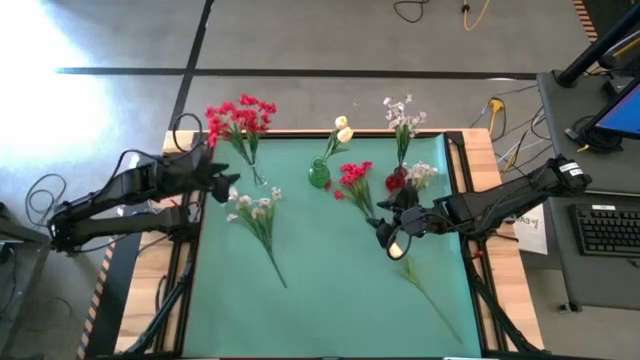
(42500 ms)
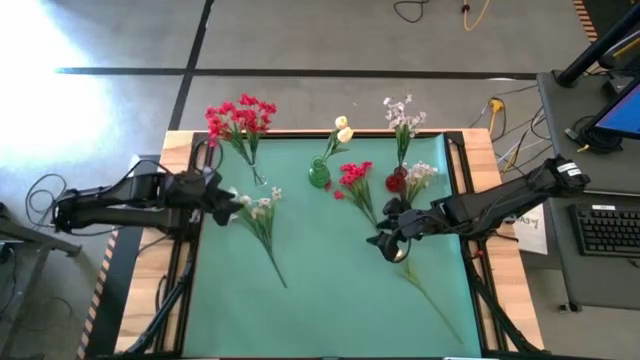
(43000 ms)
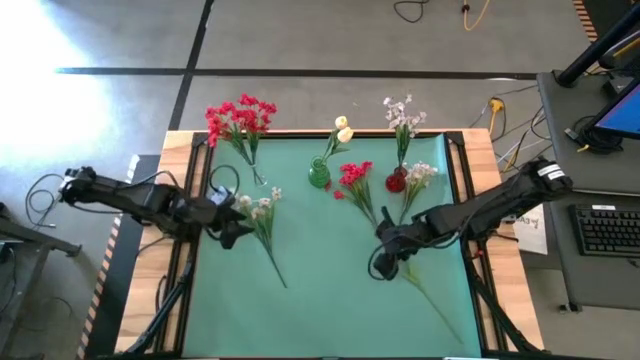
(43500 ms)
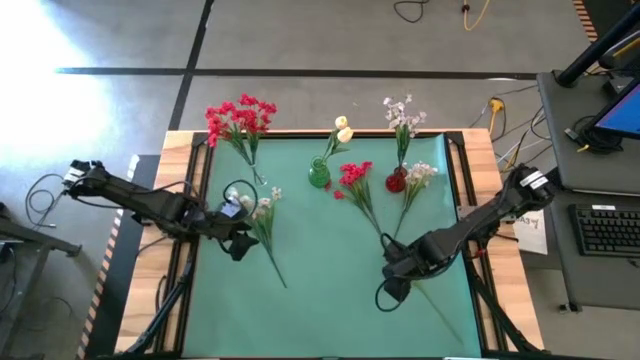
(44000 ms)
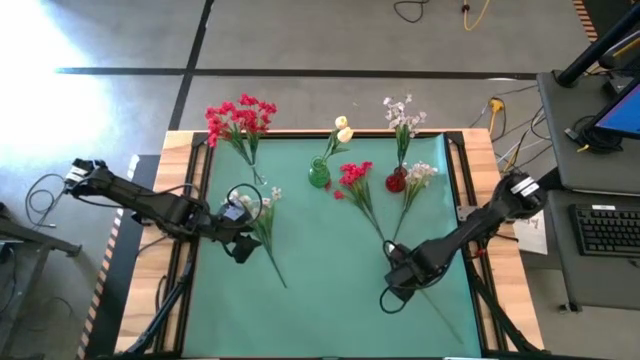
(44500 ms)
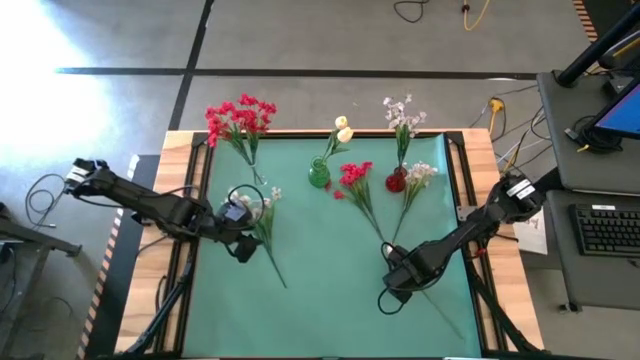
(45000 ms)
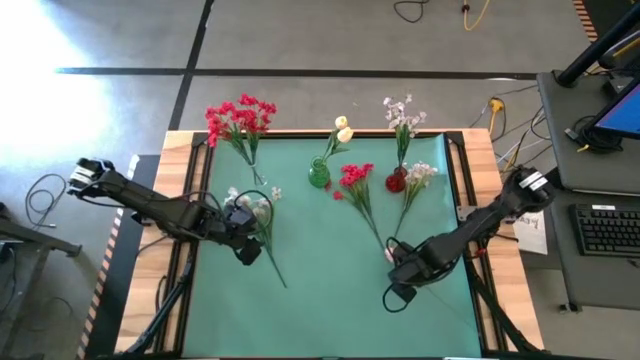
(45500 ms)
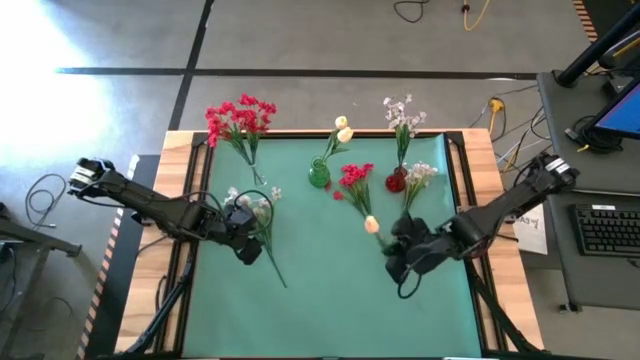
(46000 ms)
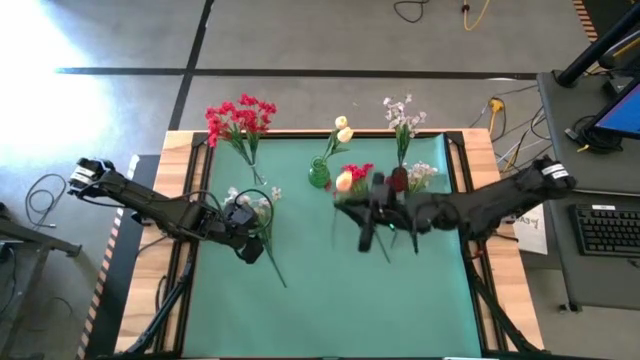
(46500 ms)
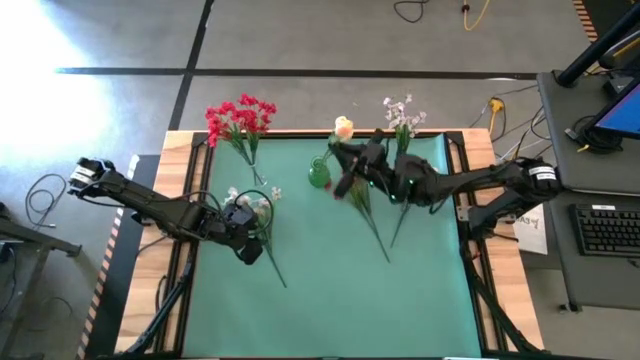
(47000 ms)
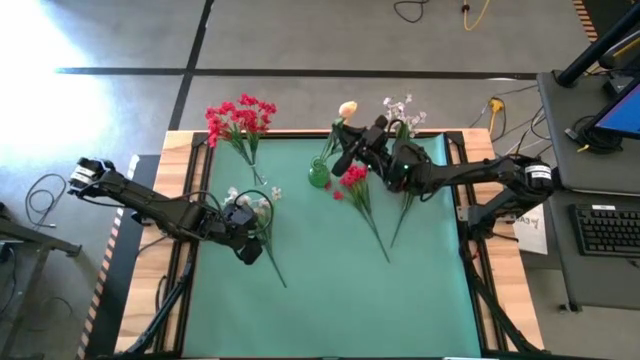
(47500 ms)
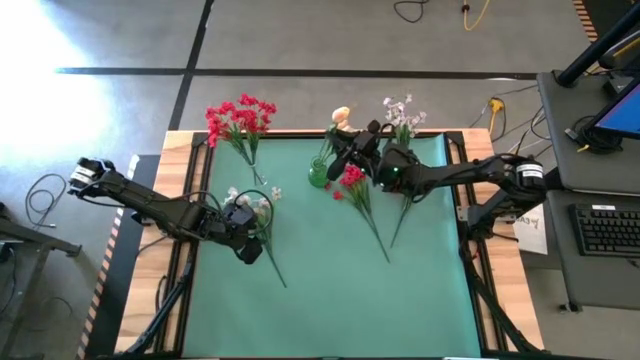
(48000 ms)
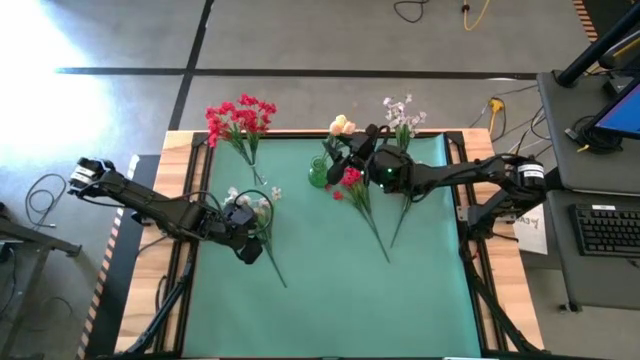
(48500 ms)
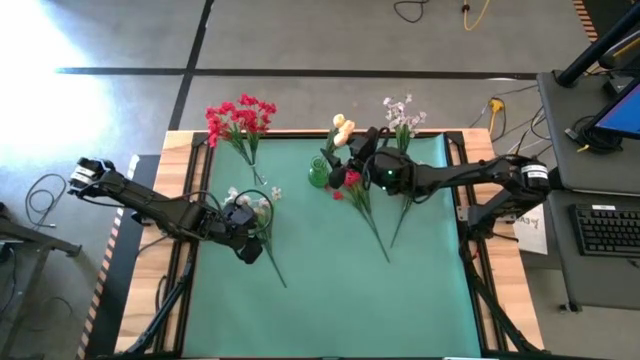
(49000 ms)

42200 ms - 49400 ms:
Task: Sort flowers into vase by color
Put the white tulip into the green vase

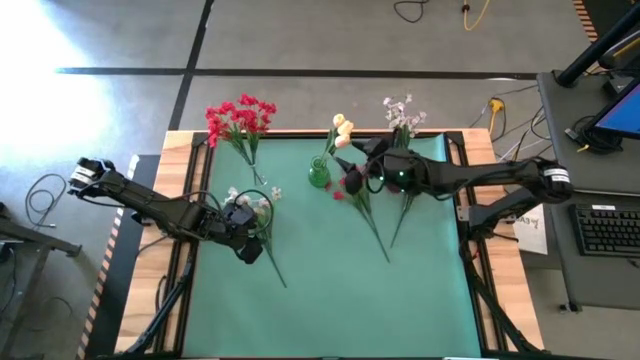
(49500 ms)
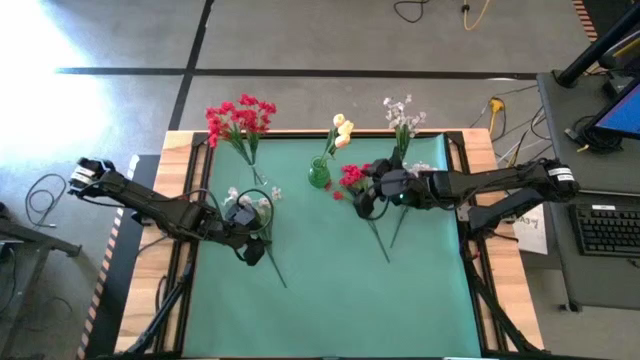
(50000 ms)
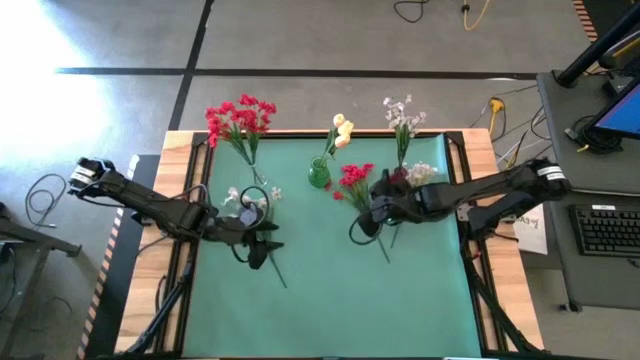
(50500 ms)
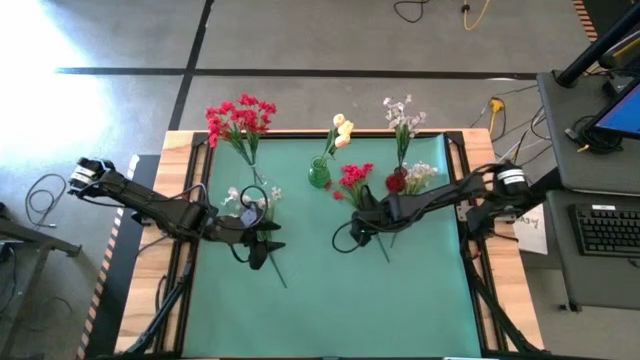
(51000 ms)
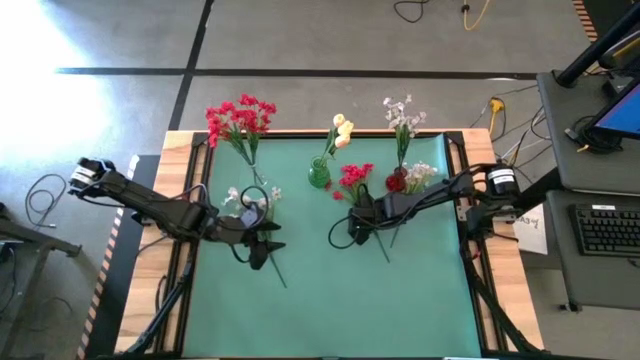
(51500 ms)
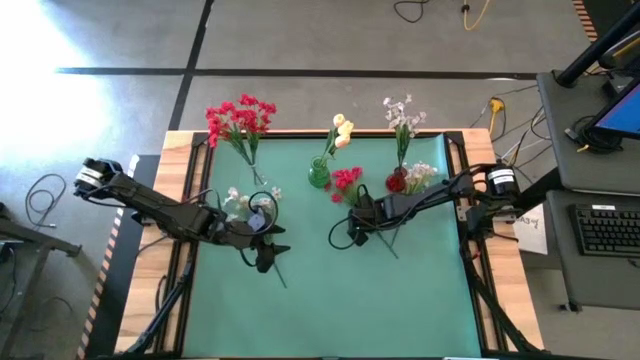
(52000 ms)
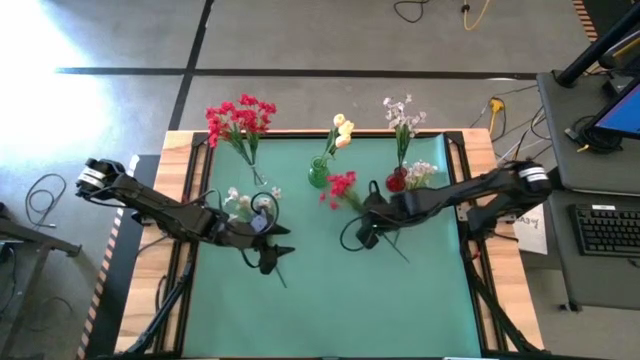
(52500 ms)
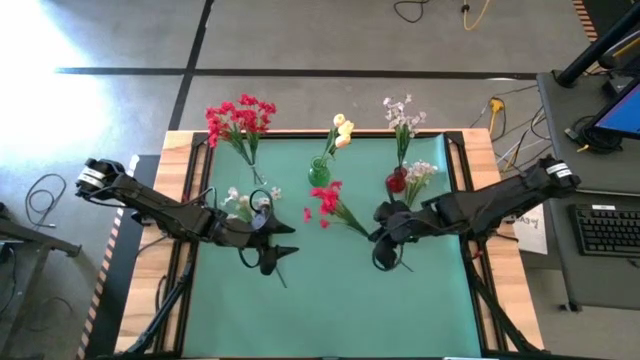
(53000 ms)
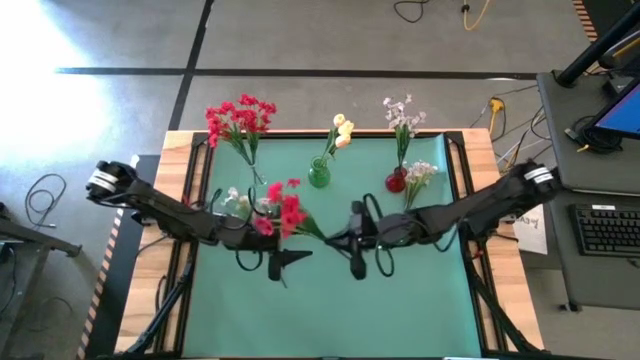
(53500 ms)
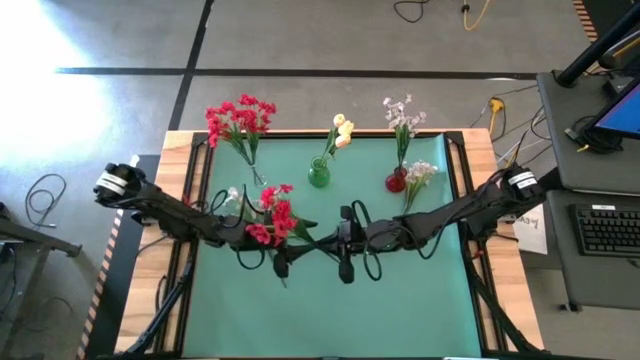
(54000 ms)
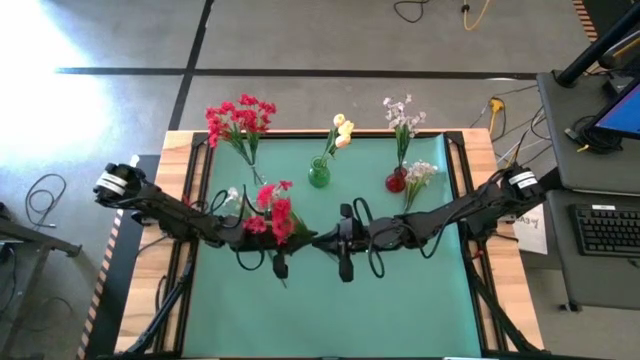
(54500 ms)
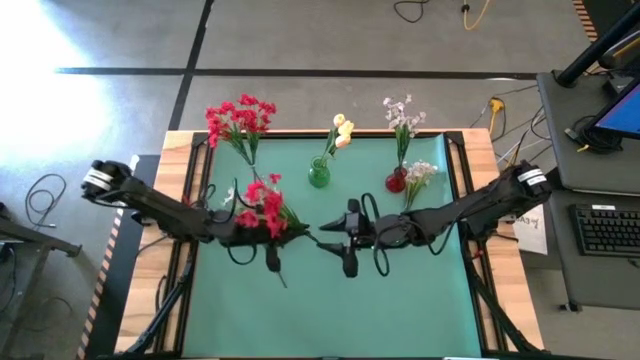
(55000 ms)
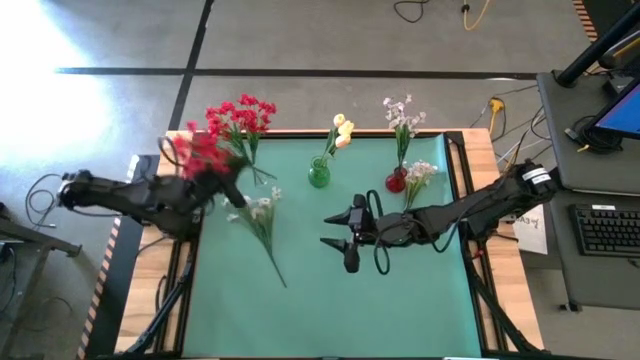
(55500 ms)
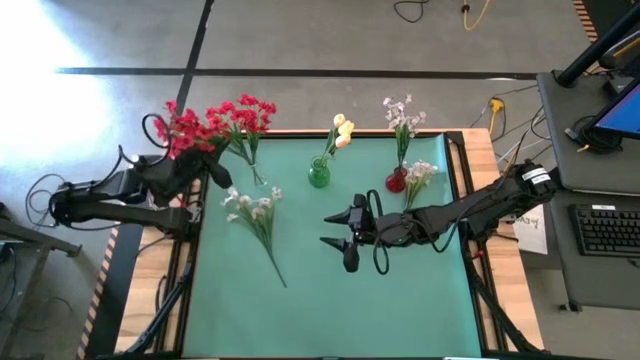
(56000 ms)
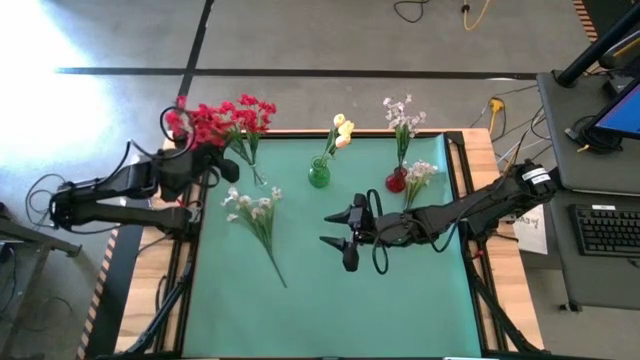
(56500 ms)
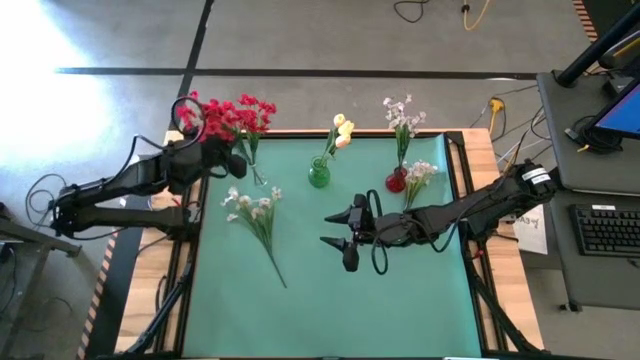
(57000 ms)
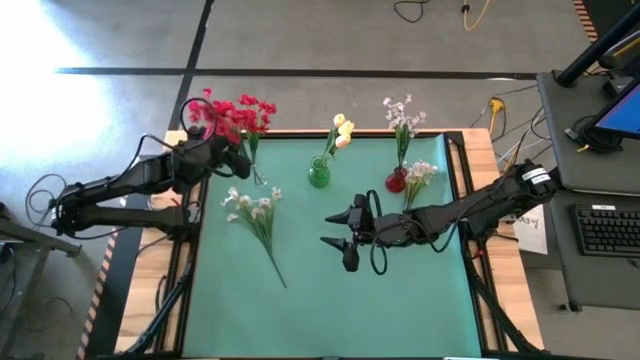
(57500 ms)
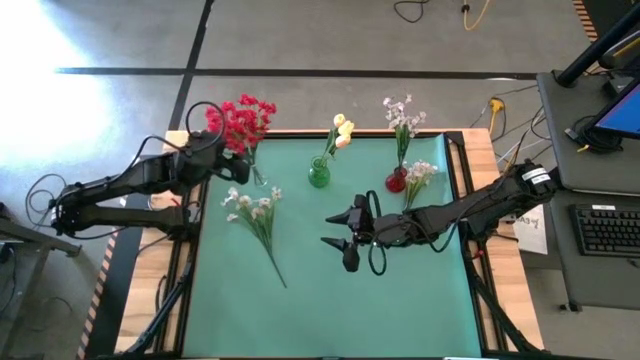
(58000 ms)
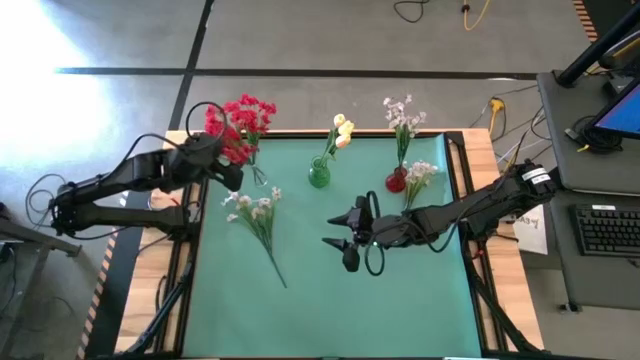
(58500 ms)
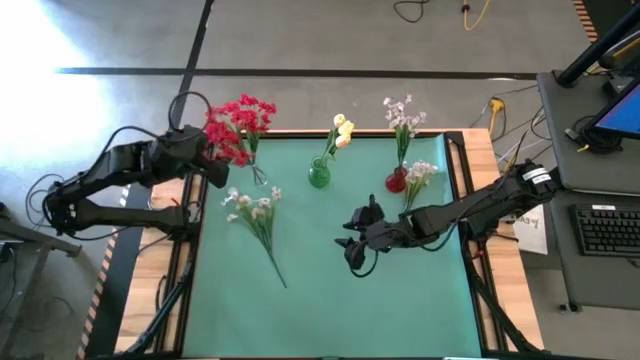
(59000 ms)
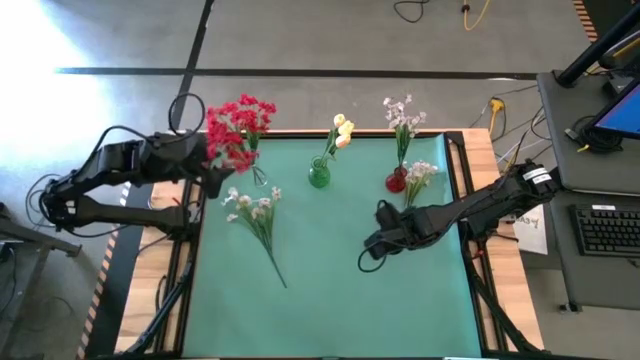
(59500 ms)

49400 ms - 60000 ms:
Put the red flowers into the transparent vase

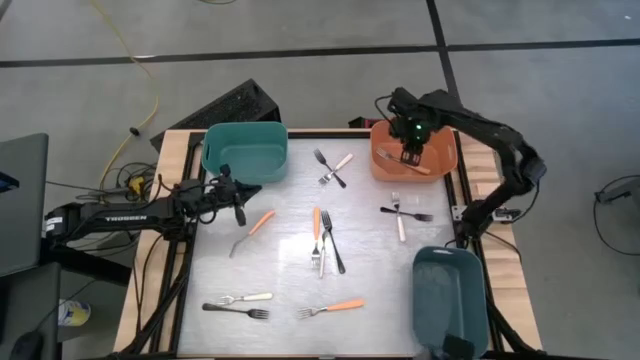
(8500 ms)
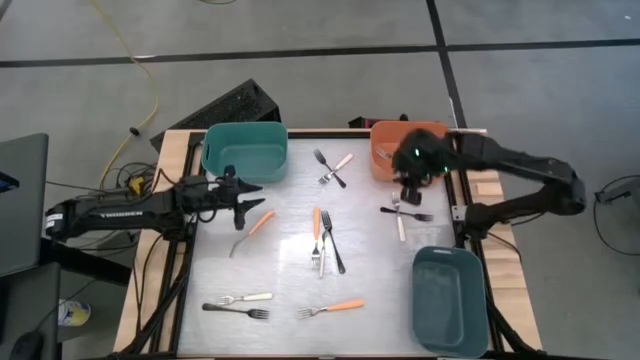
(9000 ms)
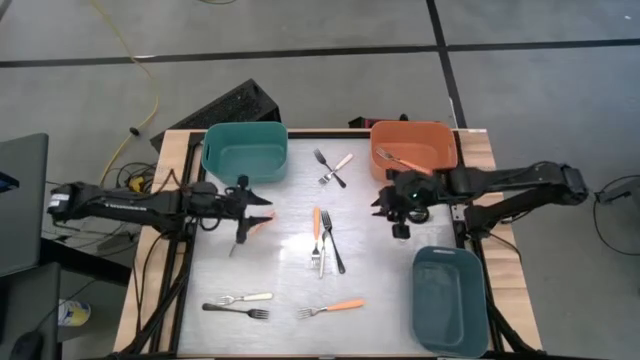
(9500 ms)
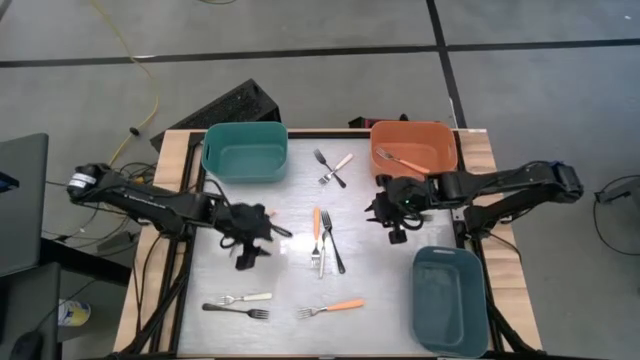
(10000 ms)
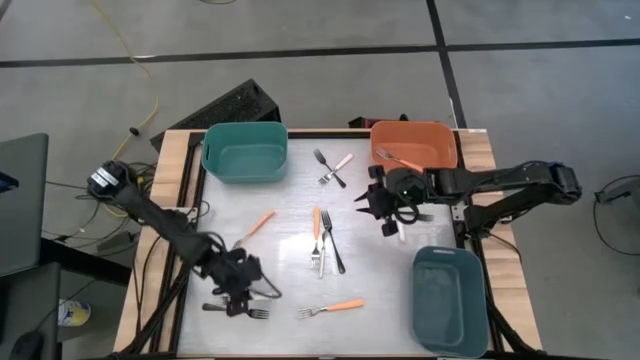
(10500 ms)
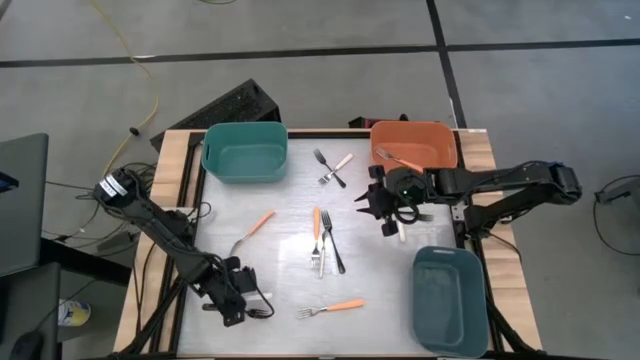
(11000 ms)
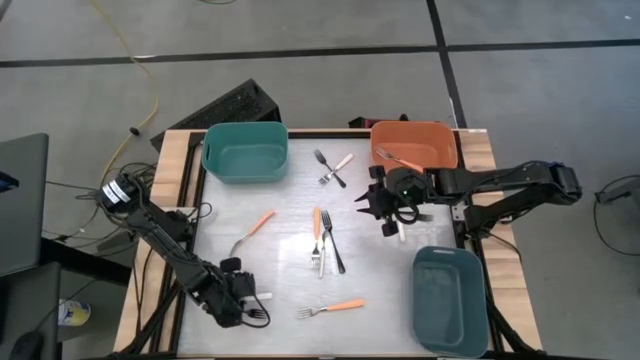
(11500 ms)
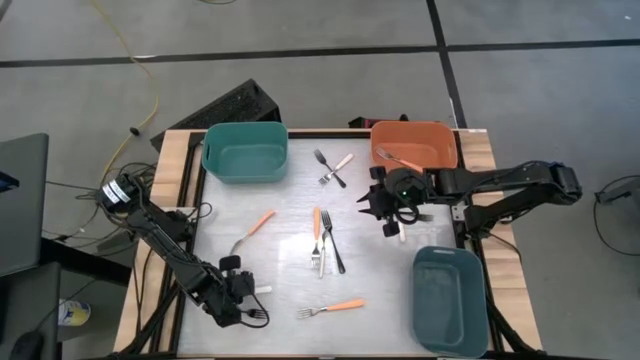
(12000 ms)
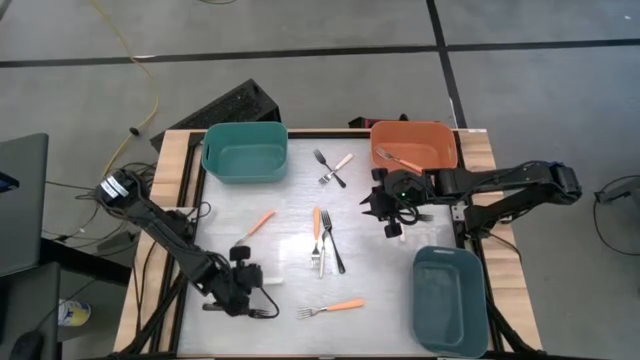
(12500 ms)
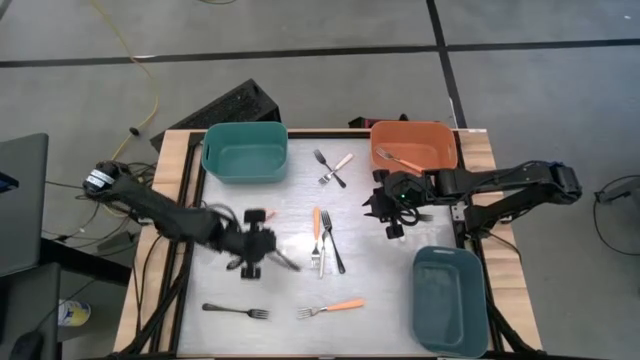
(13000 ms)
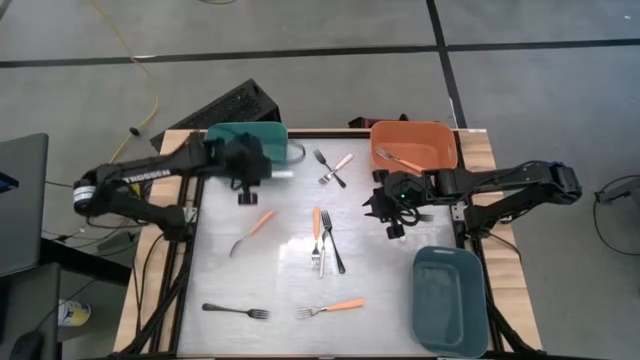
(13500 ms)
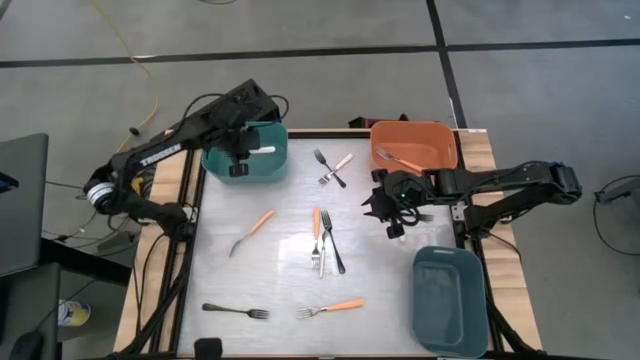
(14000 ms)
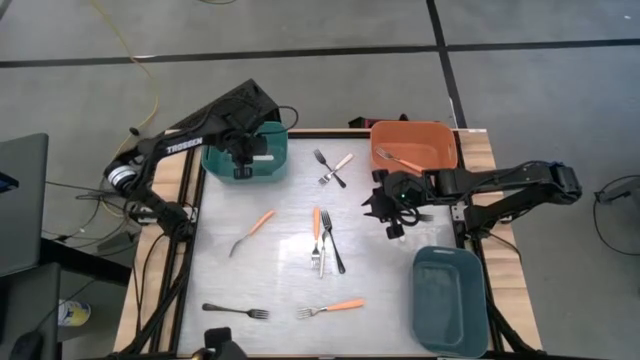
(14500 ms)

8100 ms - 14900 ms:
Task: Sort silverware by color (type)
Put the bottom left white fork into the green bin
